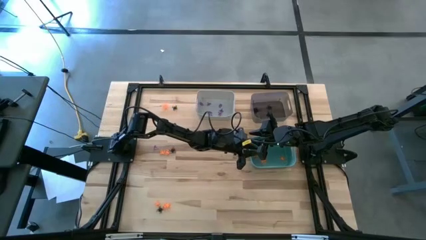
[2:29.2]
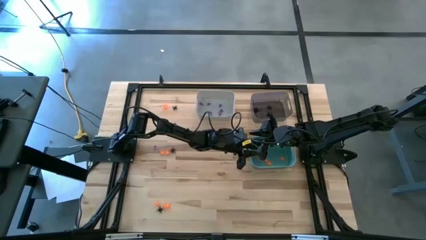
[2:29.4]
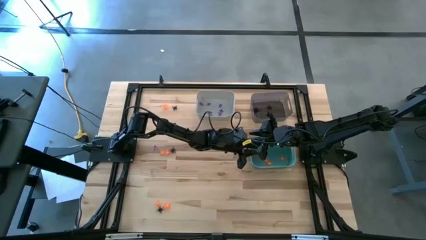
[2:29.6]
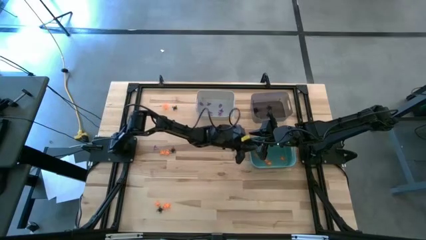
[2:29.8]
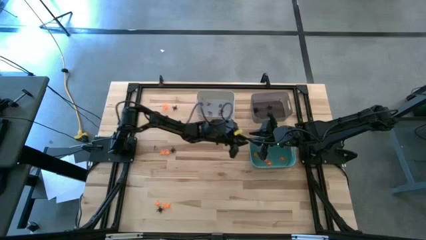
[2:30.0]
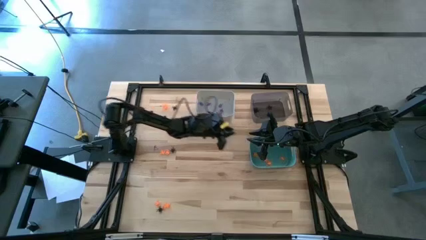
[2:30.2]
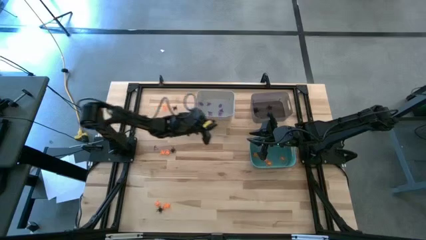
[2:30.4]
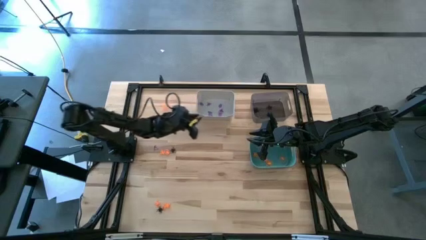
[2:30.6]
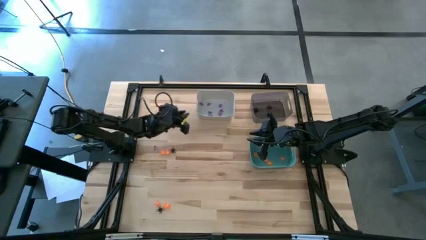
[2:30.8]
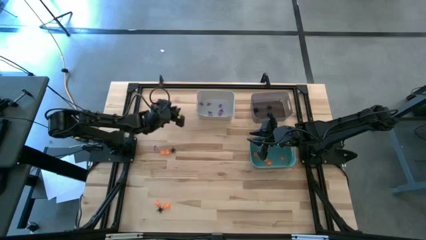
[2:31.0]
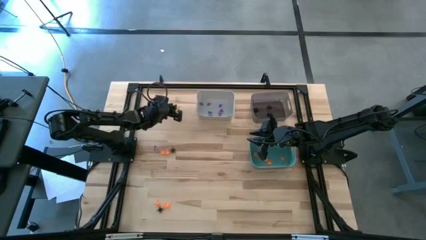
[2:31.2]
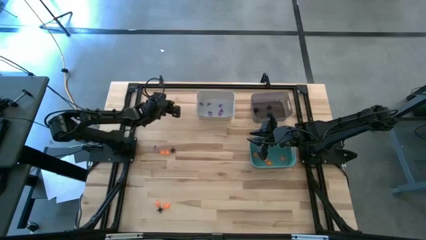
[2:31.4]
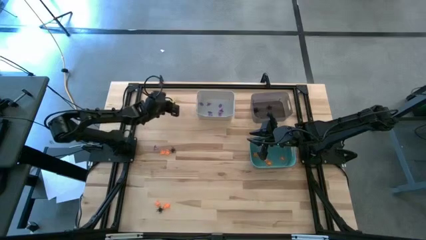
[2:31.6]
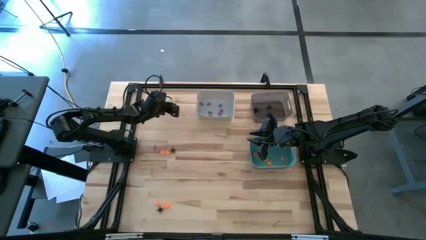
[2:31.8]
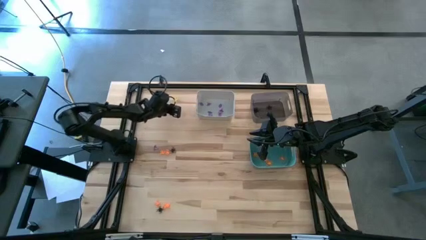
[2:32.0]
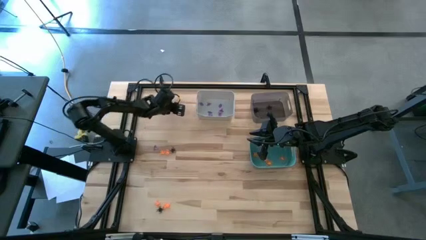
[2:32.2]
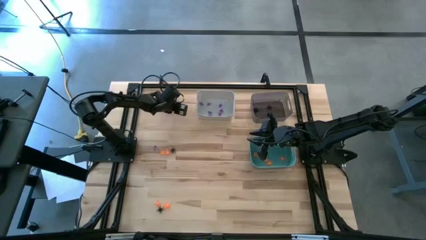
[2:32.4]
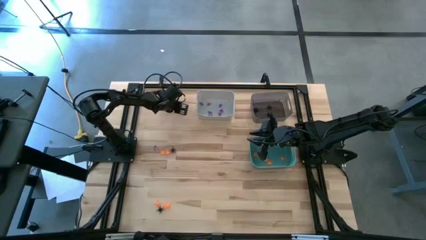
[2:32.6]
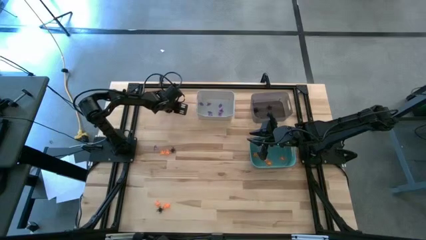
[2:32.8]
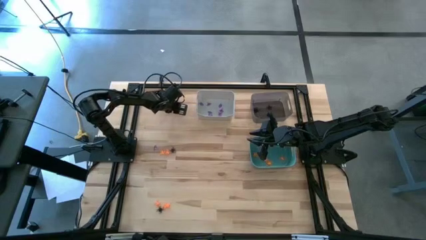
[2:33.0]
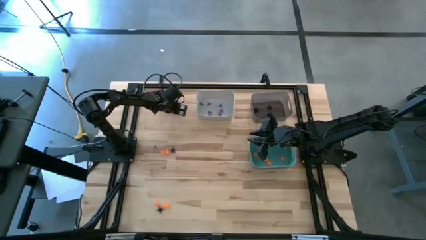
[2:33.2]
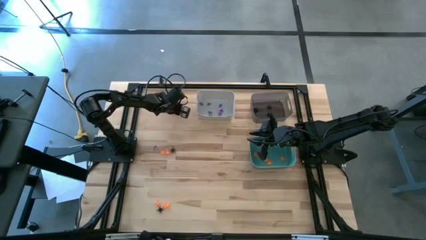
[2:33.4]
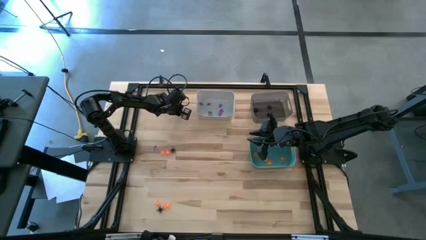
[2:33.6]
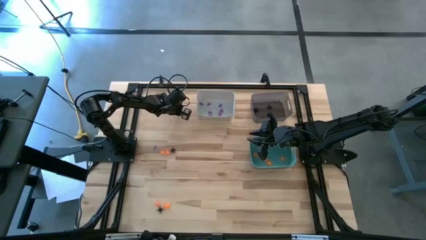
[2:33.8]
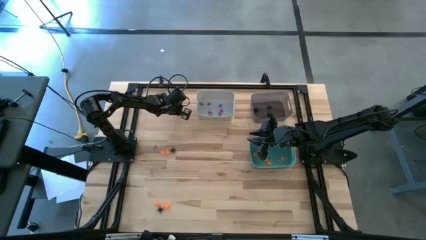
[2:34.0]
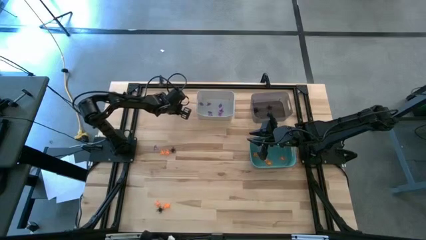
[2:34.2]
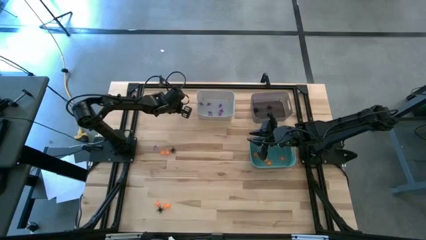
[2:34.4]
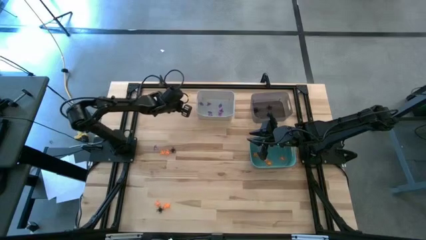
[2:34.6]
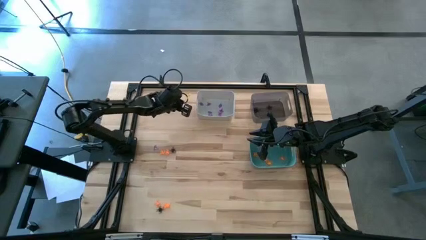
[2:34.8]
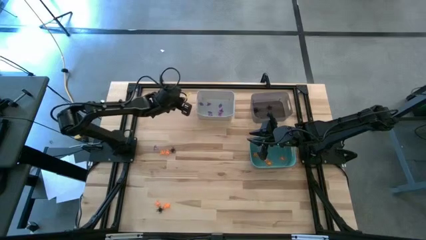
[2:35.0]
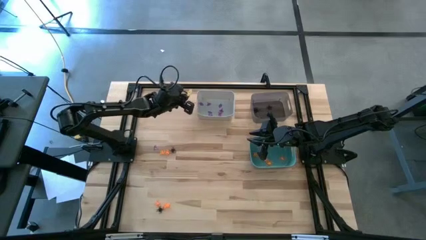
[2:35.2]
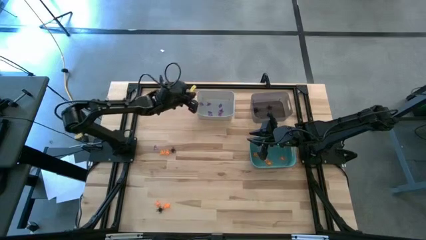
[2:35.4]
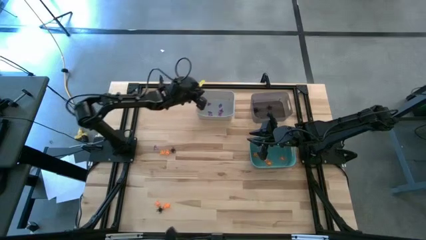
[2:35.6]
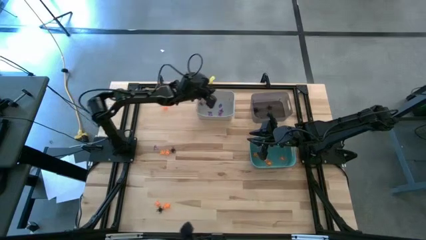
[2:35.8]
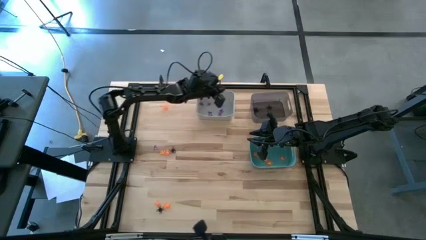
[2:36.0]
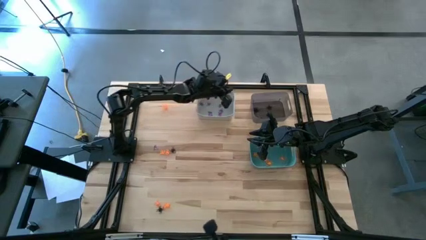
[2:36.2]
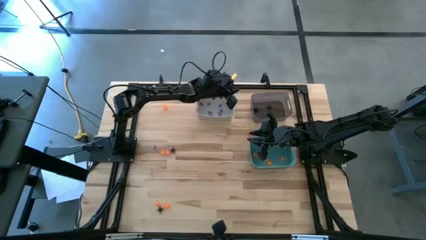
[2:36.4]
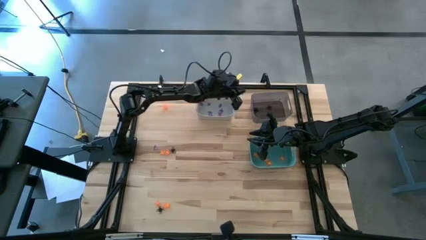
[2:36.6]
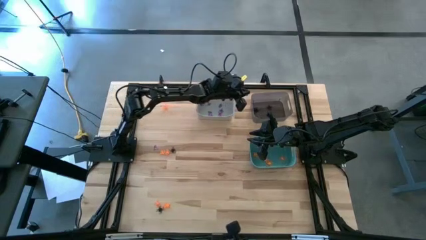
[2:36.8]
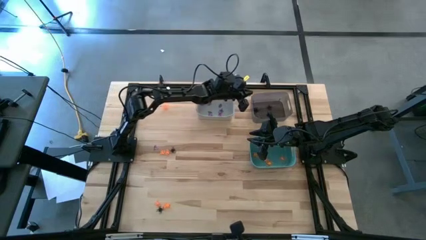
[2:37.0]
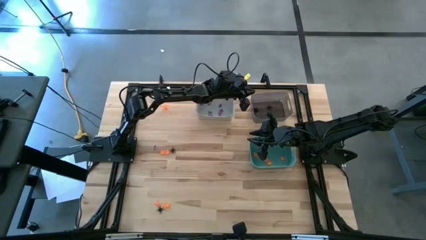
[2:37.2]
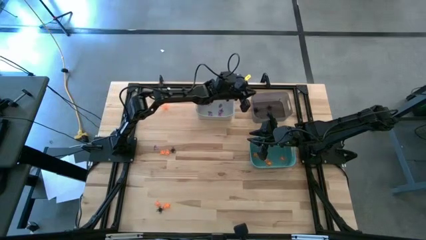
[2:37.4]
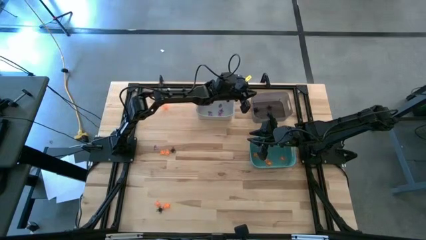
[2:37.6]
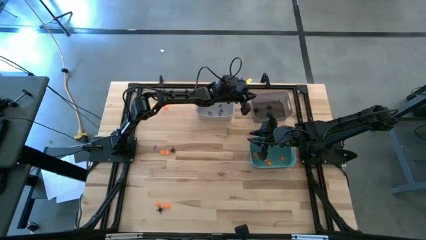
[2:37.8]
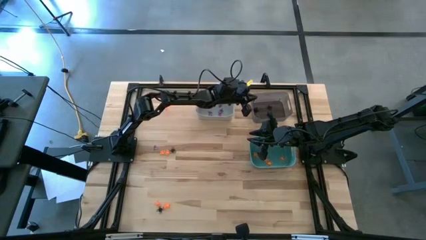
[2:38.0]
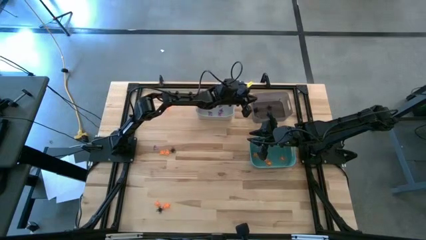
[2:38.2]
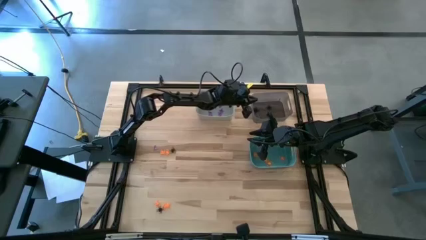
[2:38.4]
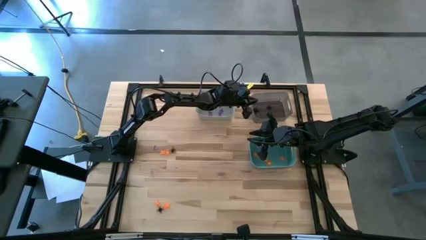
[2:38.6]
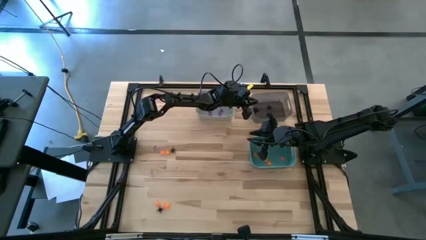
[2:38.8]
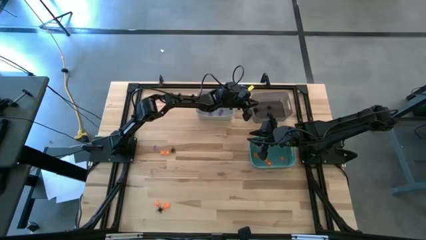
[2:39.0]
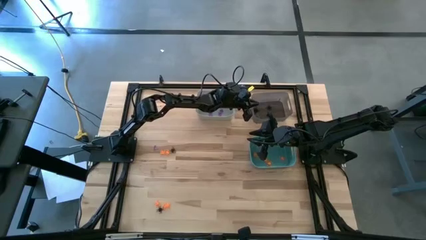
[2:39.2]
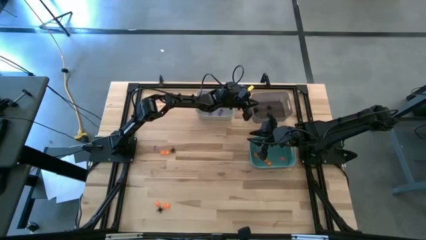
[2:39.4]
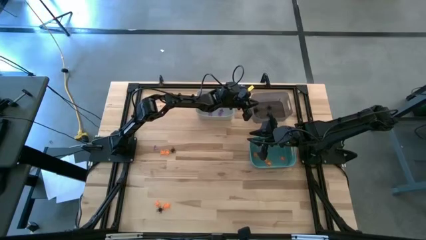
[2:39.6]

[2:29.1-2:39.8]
Task: Sort Halloween decoration
Put the black spider toy into the black bin

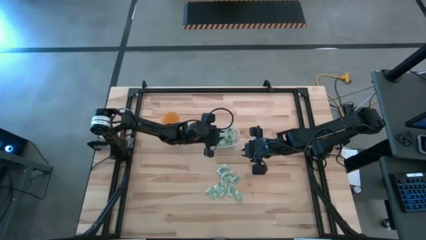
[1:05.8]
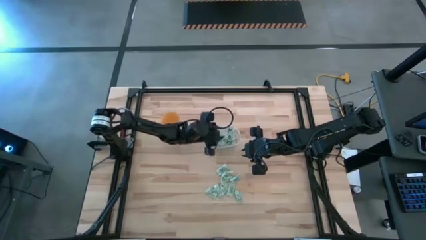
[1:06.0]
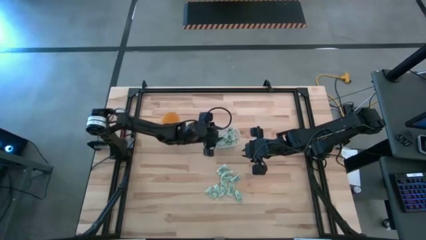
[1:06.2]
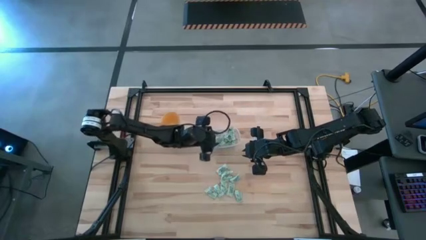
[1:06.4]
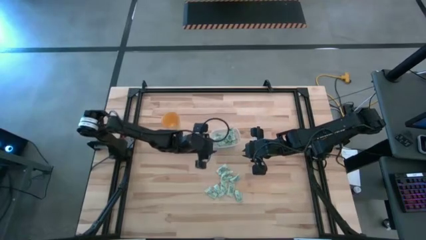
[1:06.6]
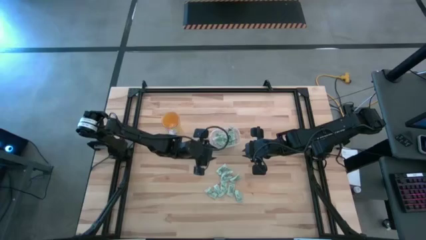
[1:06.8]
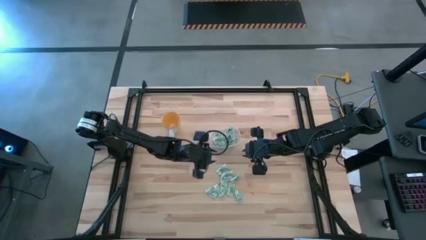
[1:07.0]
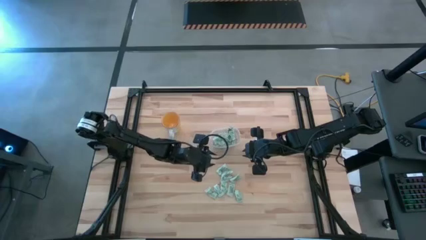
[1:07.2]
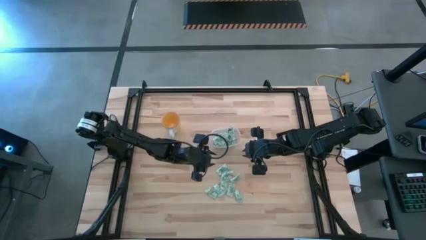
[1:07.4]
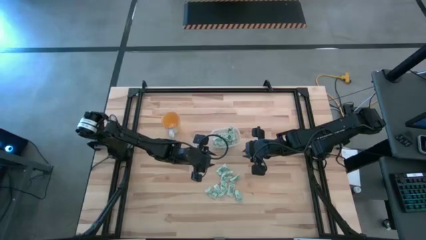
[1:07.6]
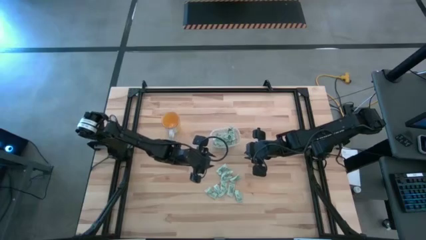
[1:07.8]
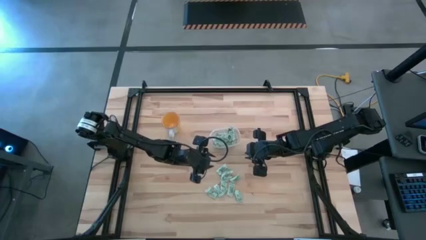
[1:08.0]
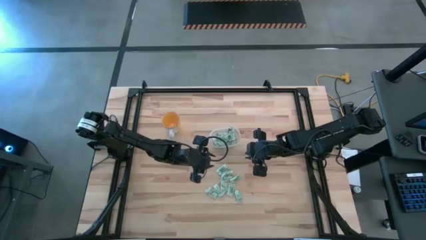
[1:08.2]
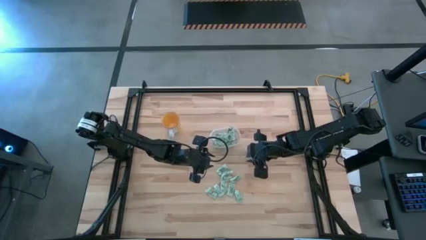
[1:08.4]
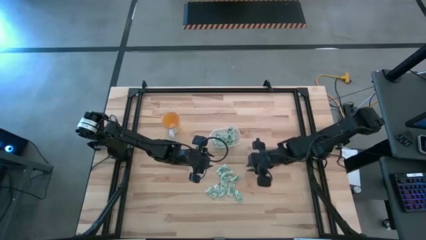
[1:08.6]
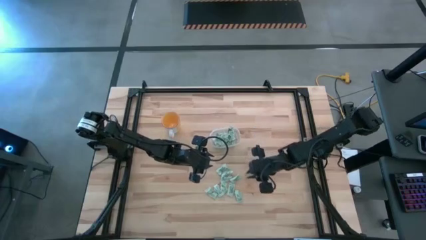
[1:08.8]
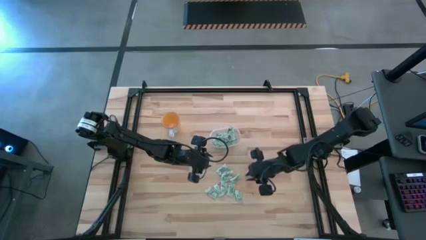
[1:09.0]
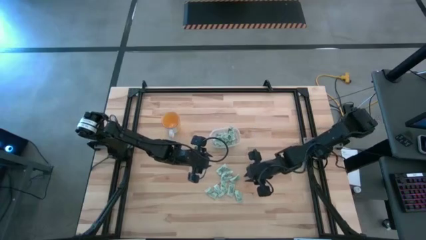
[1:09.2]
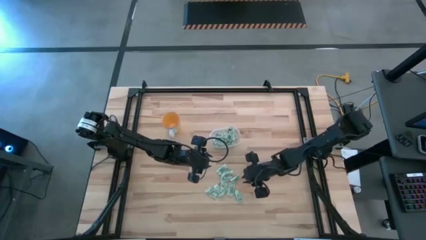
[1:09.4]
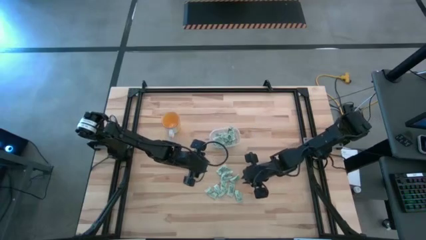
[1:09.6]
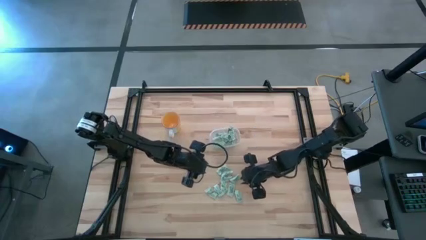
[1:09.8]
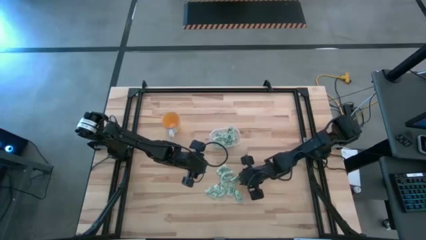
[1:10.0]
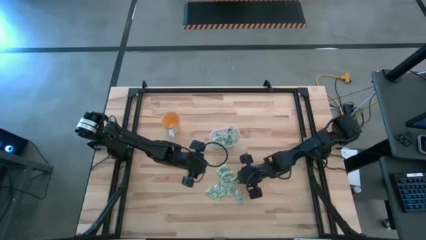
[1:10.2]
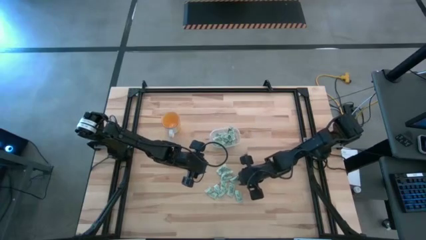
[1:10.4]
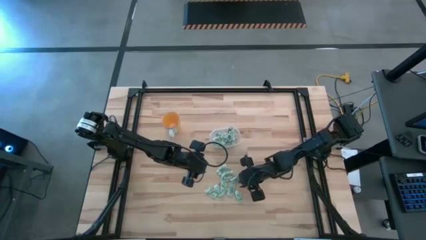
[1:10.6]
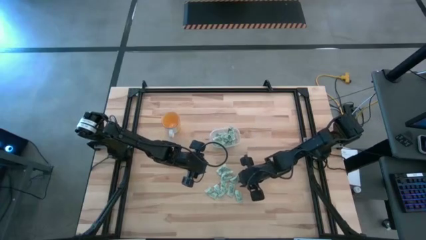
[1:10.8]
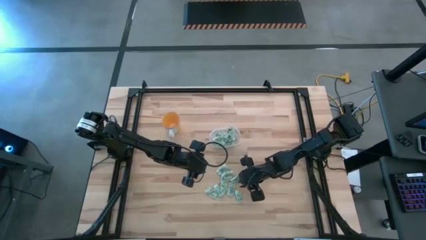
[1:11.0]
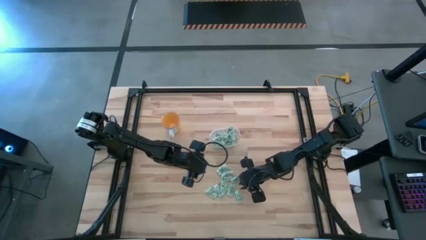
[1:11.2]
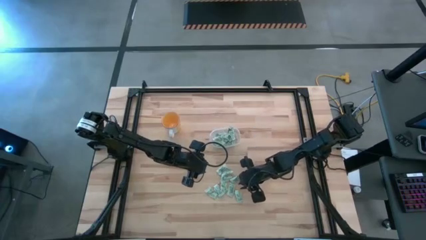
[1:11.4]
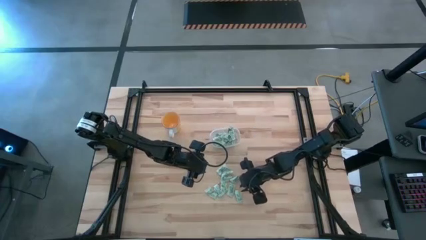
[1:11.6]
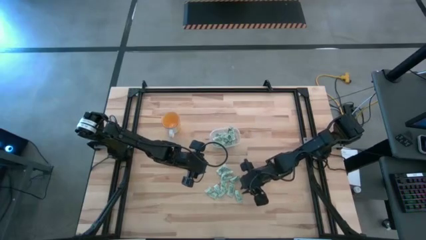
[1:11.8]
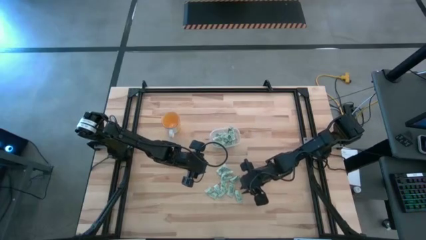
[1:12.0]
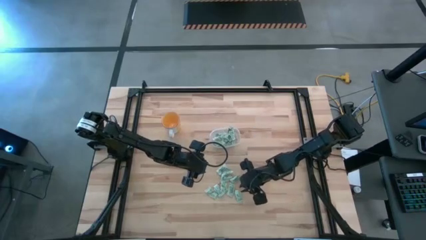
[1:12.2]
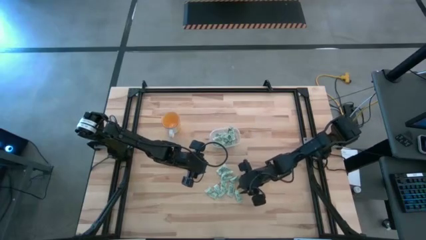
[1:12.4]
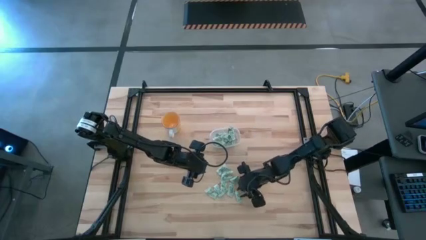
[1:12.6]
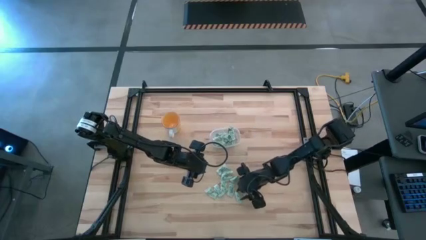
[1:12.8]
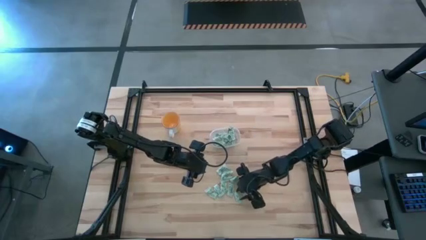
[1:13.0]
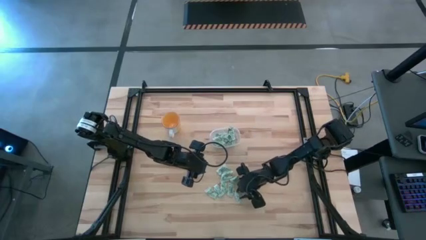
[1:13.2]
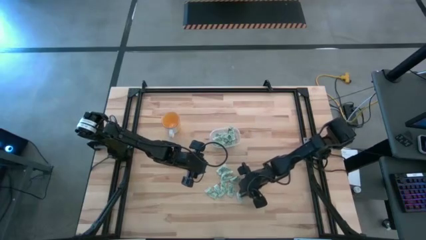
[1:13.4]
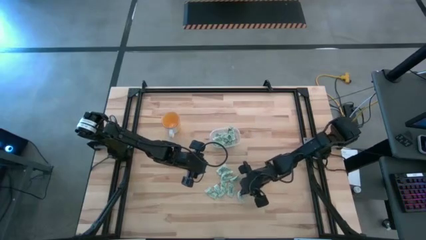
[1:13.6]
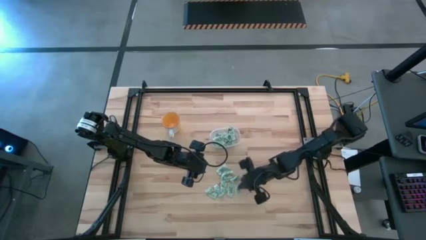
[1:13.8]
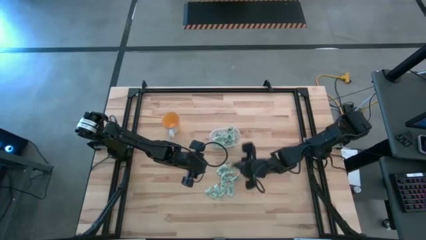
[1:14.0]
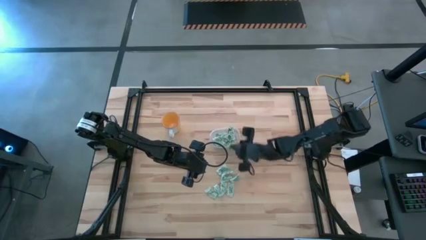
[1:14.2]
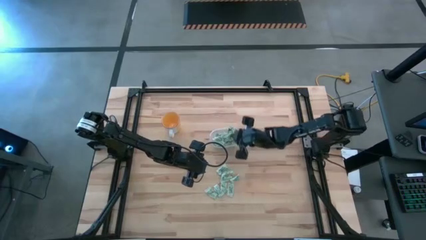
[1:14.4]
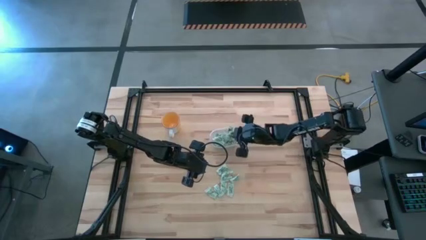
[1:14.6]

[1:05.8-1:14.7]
Task: Pick and place Stevia / Truvia into bins
Put the stevia packet into the transparent bin
